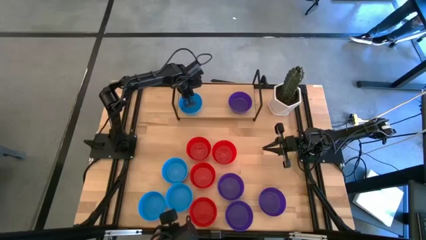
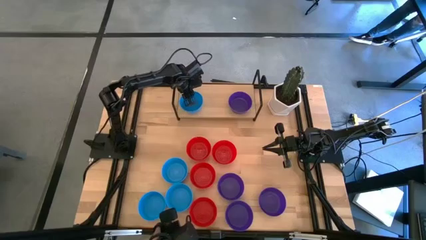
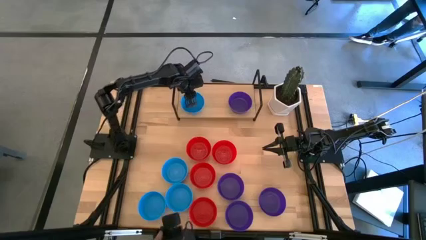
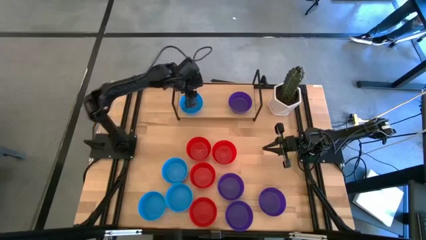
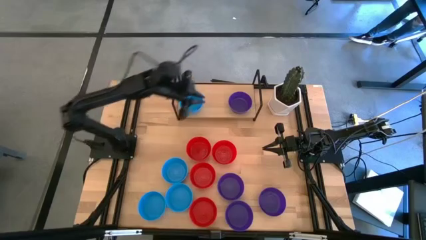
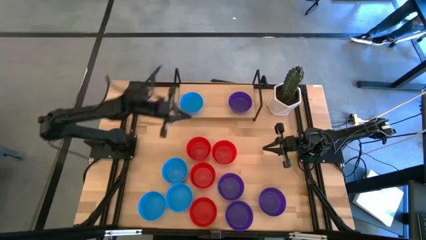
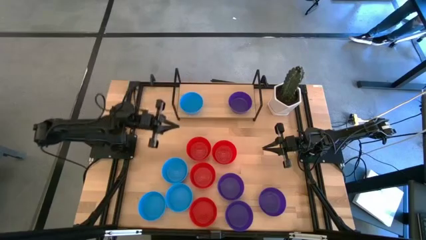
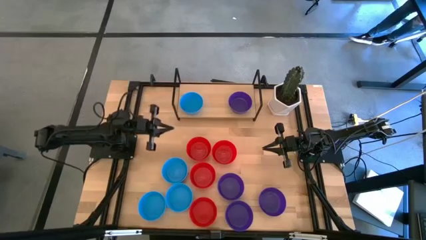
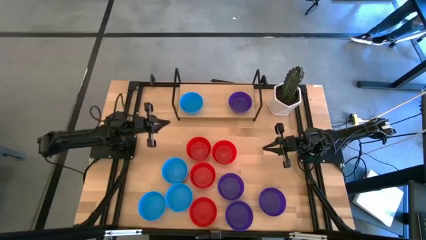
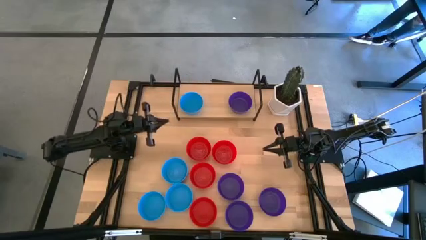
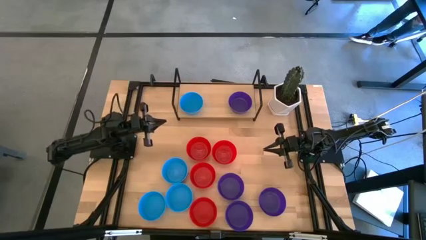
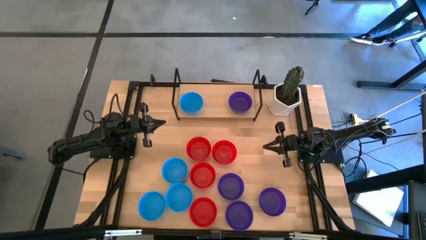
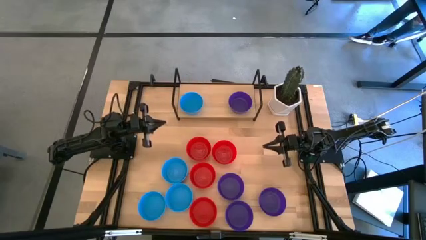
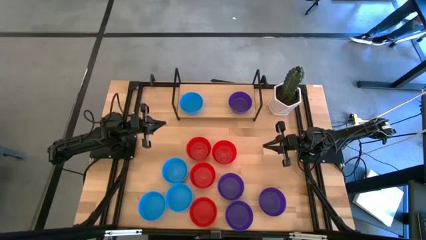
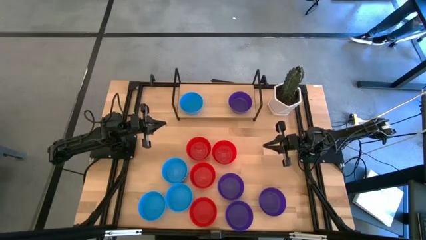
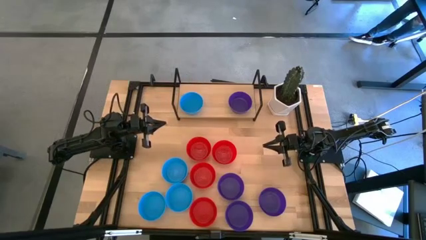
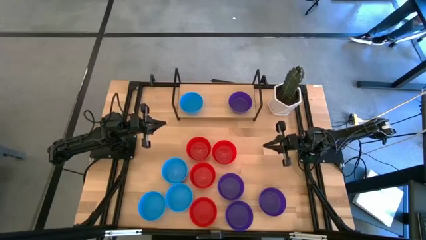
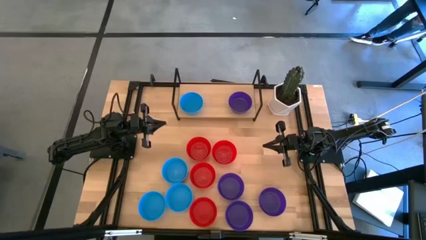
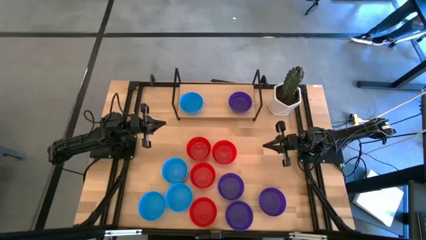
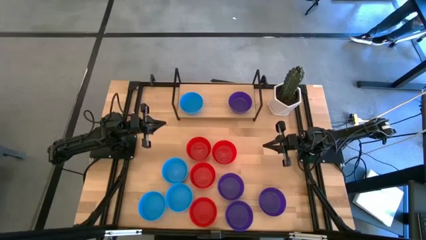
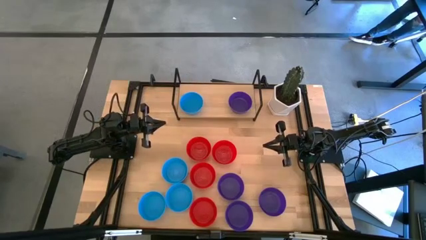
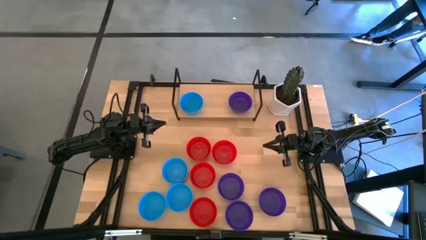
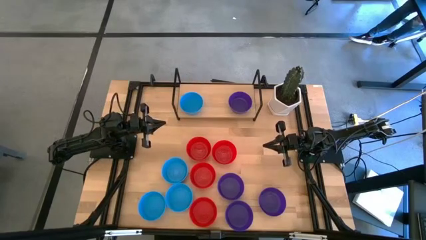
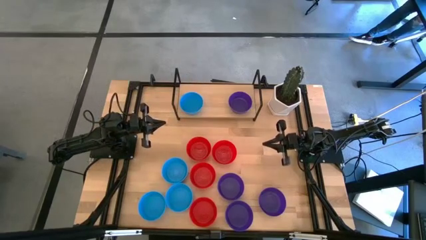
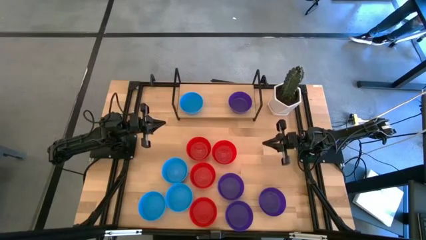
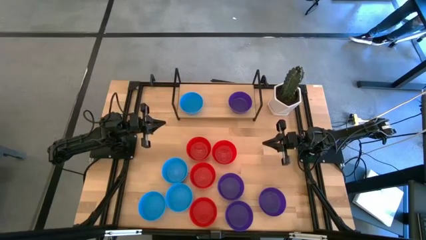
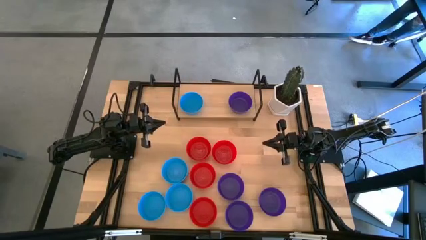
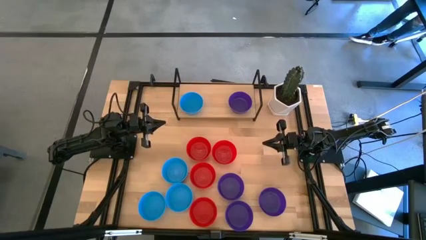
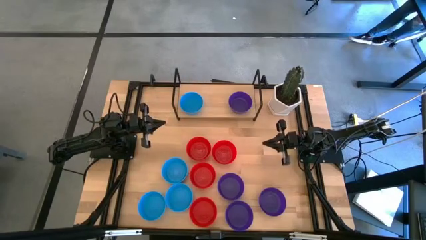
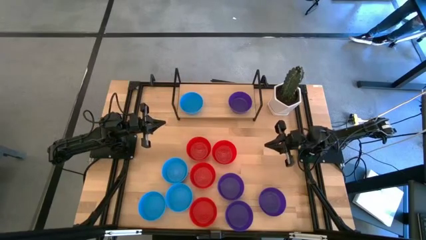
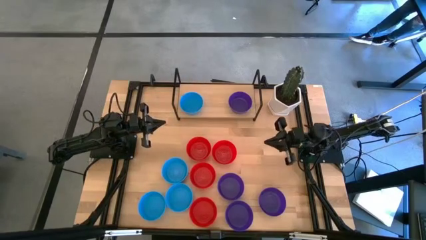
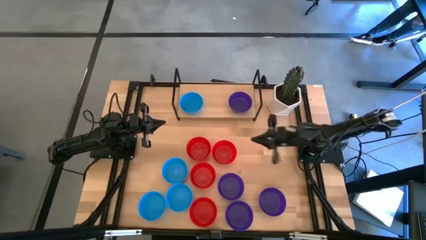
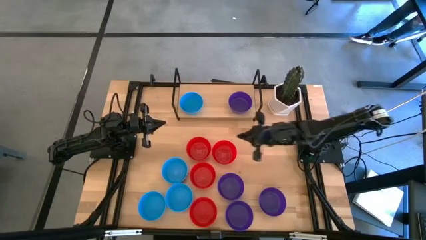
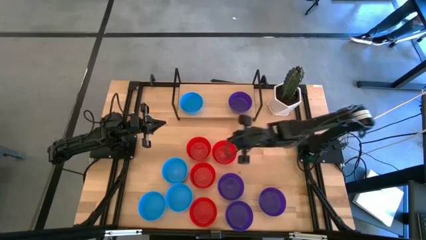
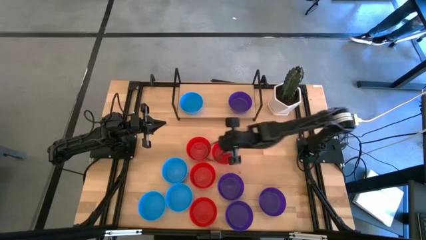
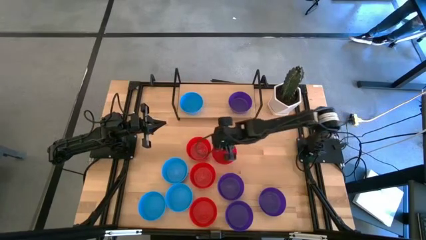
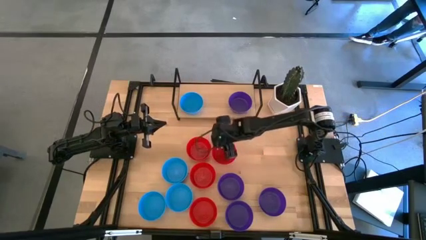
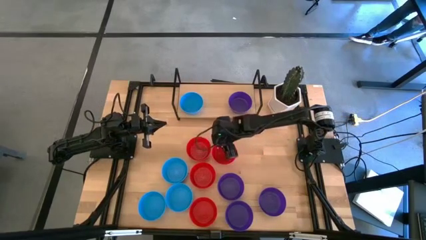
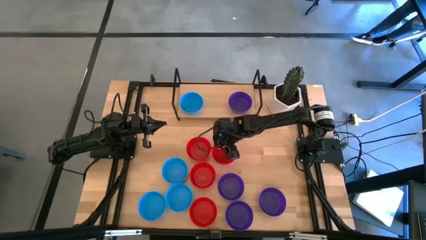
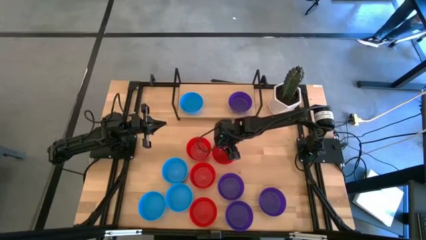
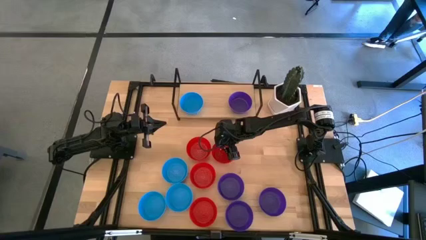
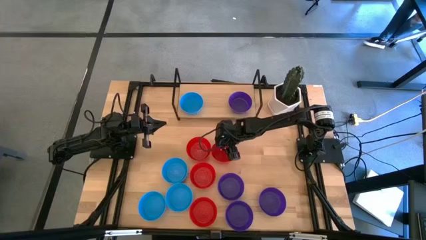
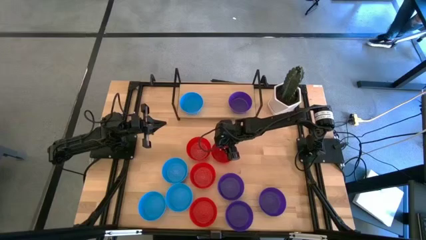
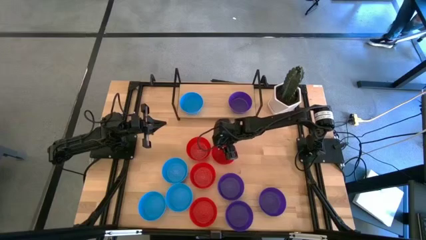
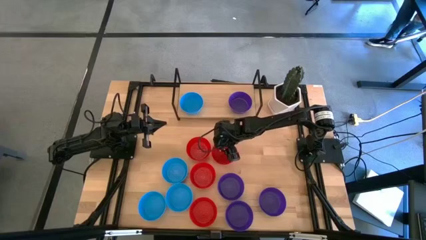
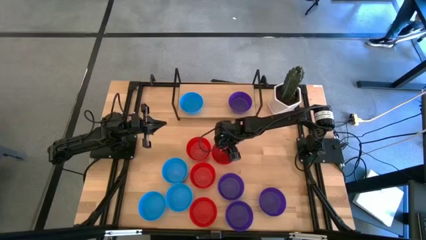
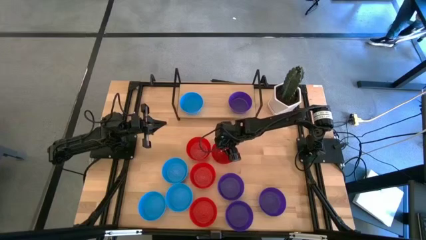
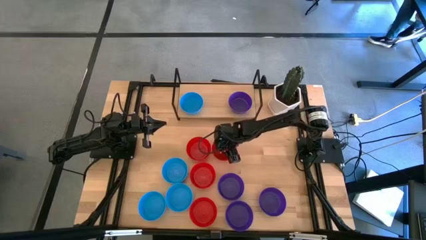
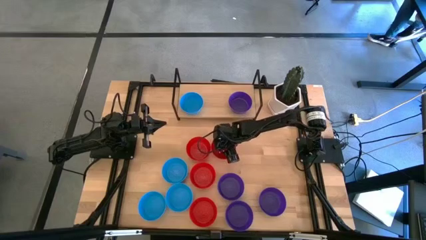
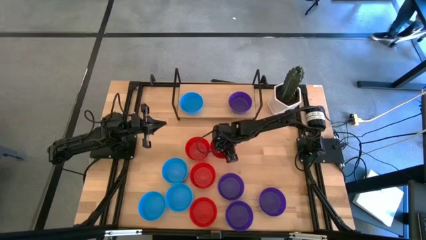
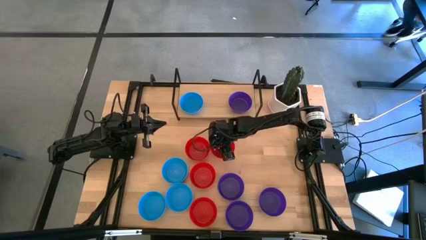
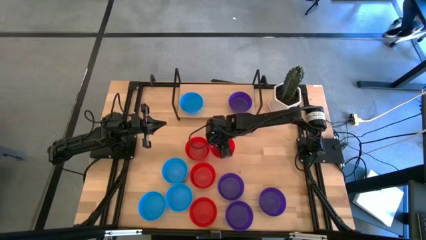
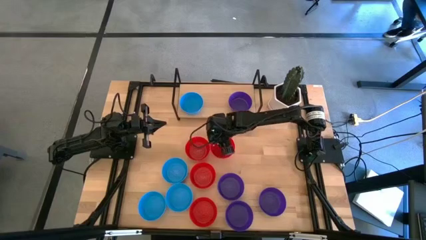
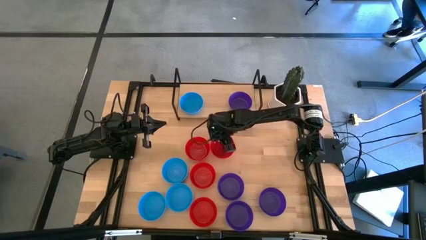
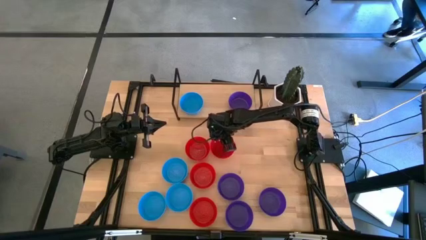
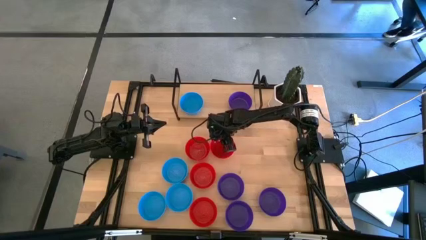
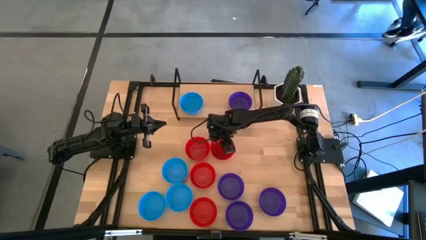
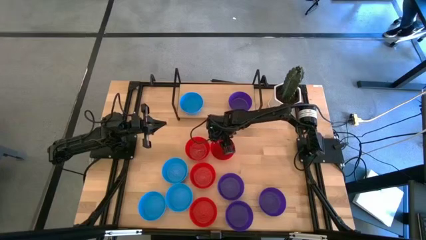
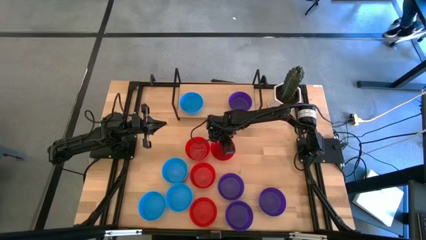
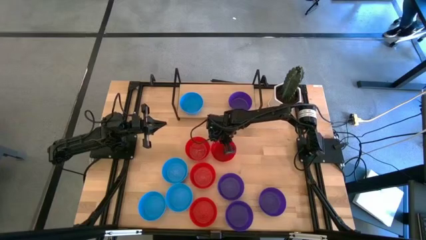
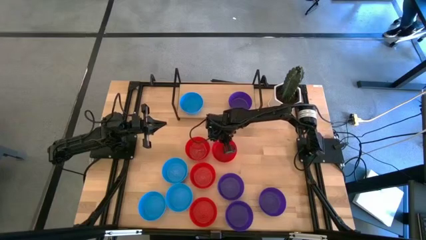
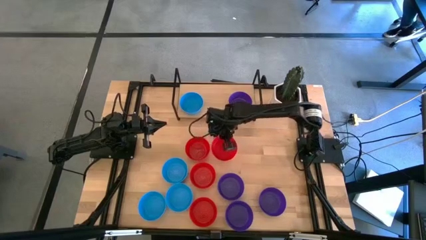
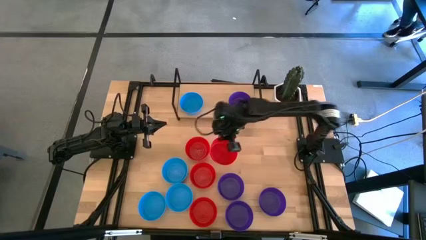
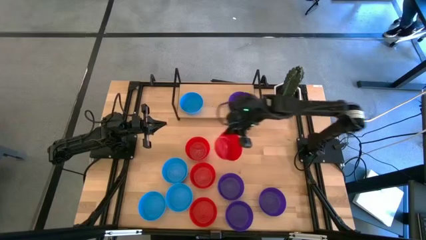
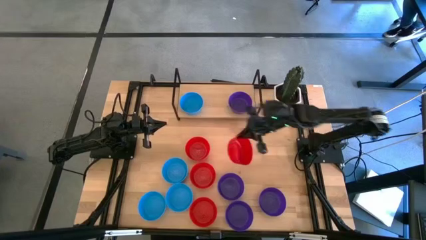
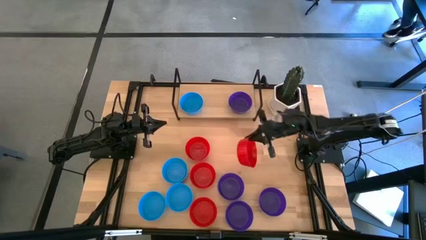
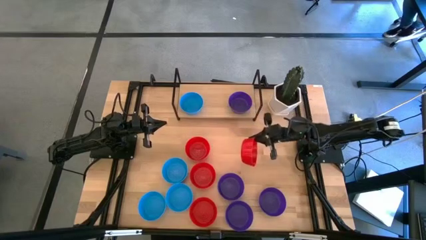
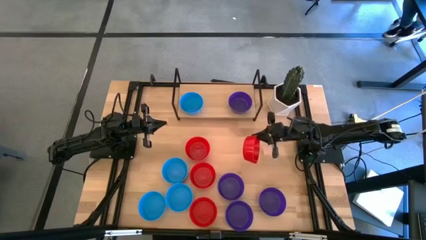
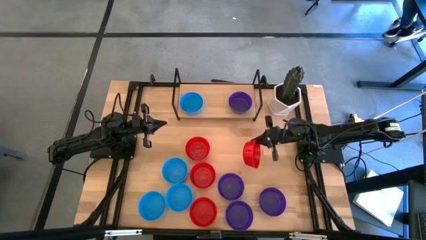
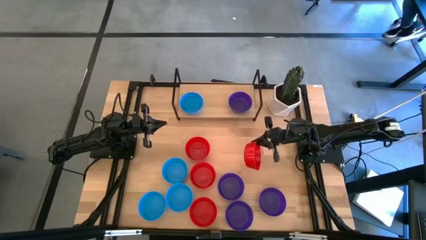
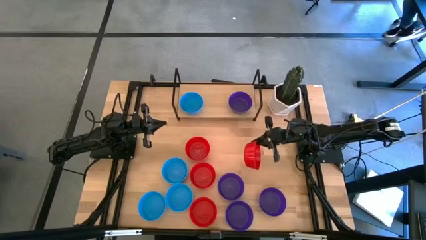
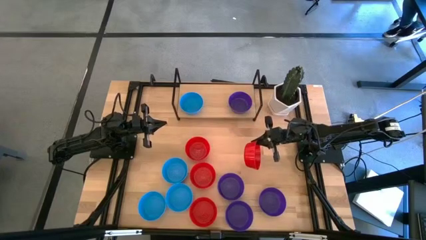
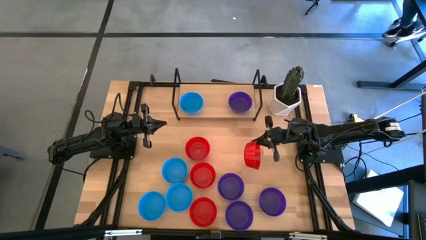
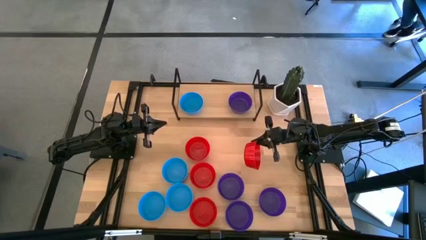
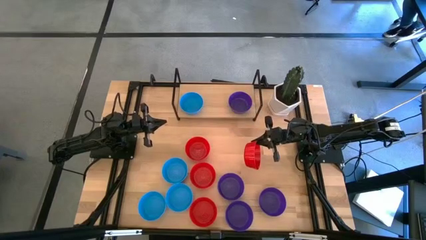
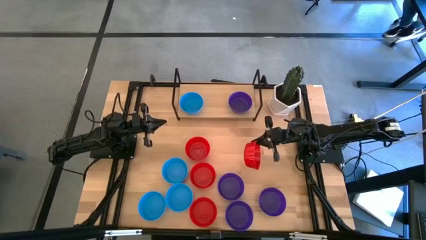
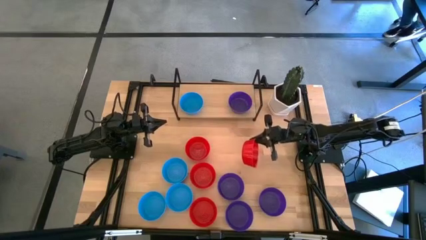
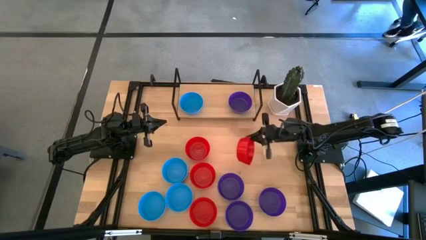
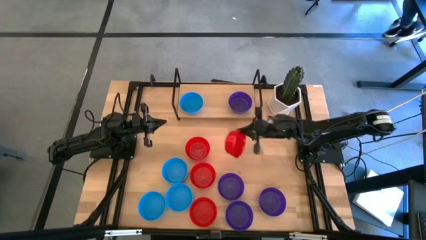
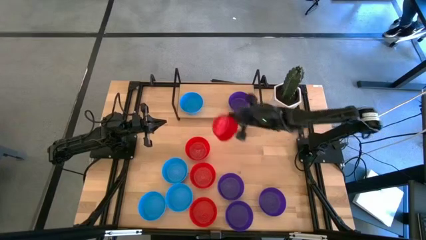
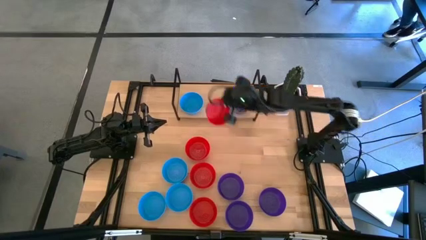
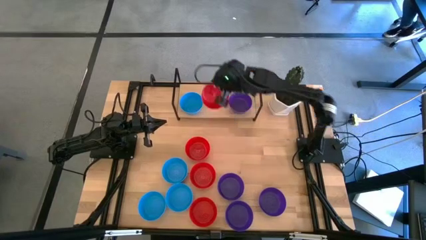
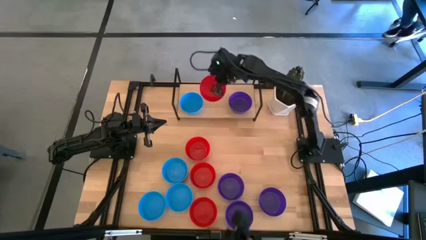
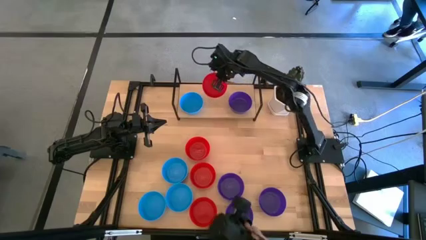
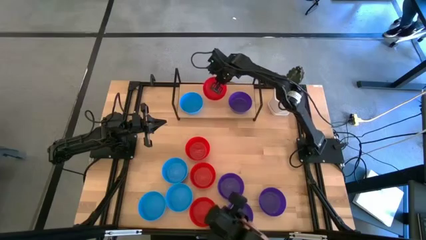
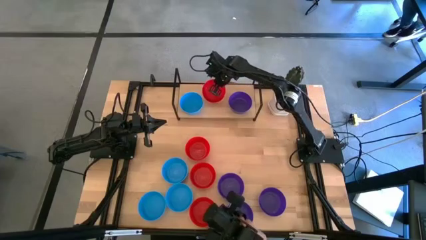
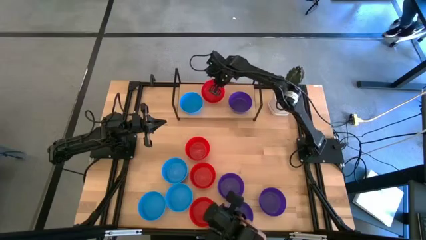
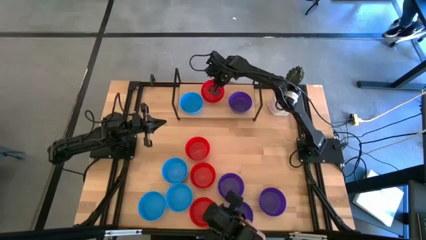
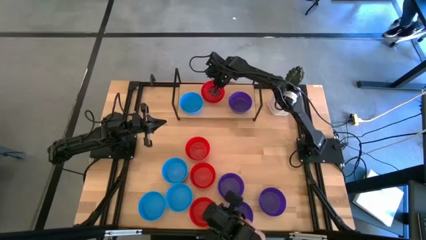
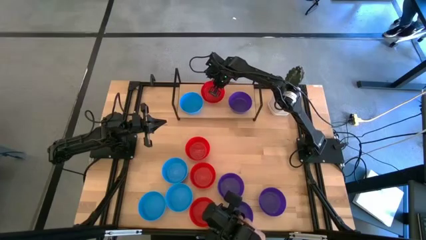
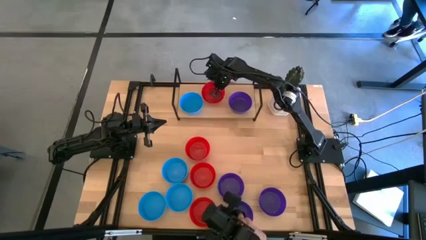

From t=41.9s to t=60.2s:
Task: Pick & Place Mini bowls
Put the red bowl on the shelf
